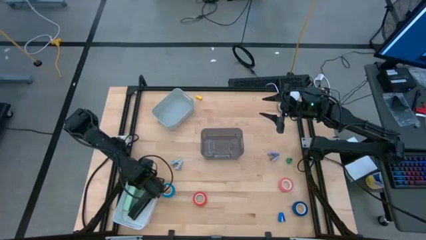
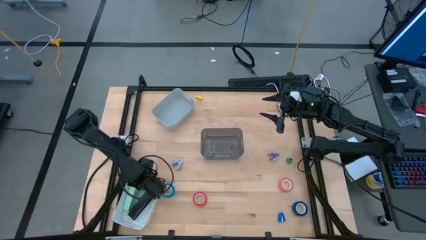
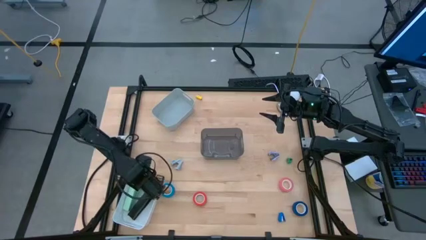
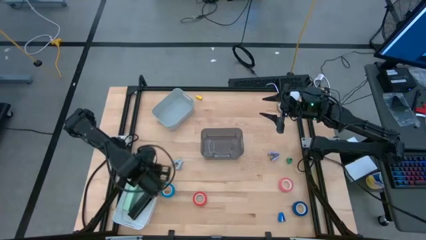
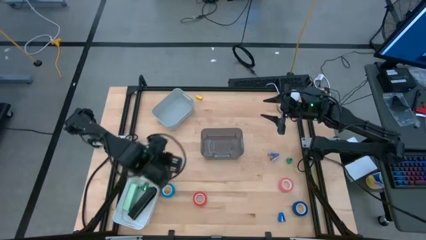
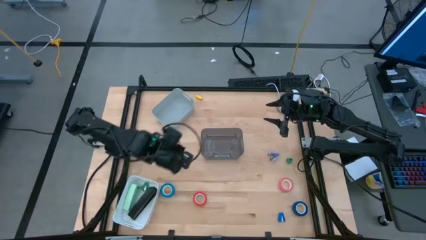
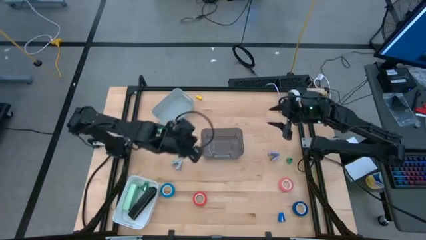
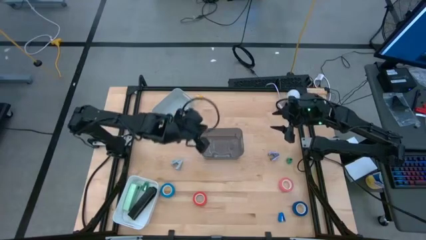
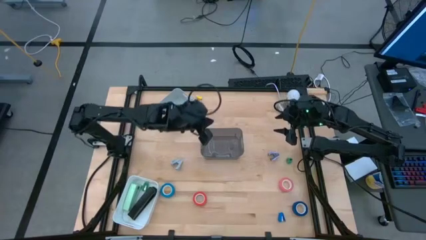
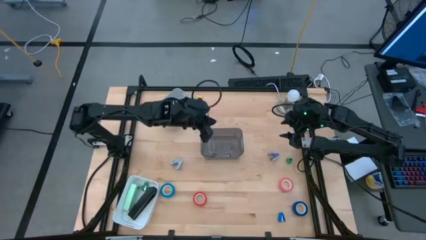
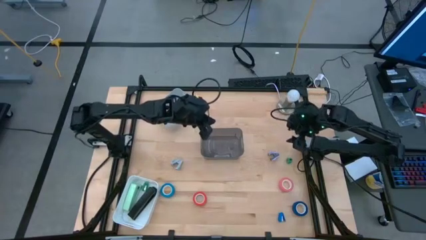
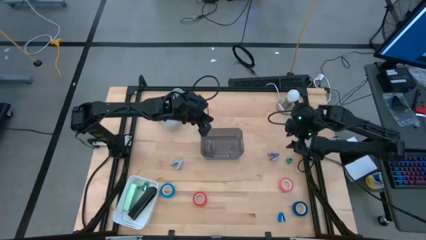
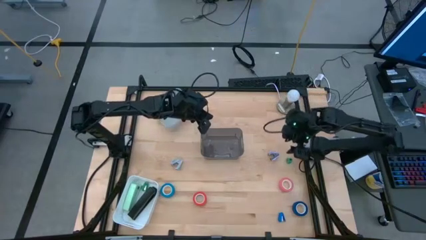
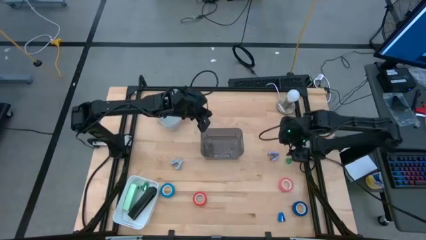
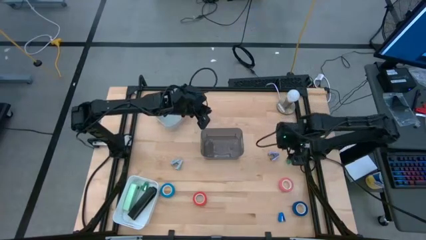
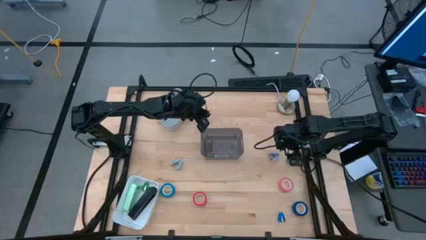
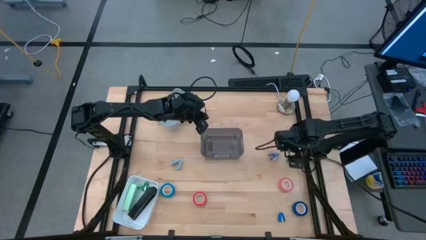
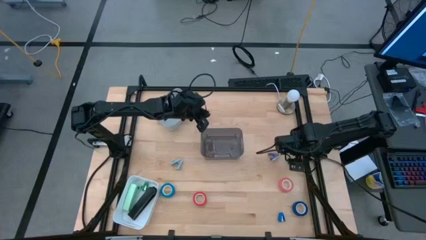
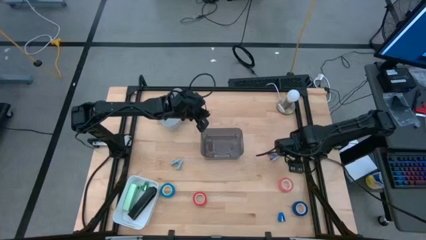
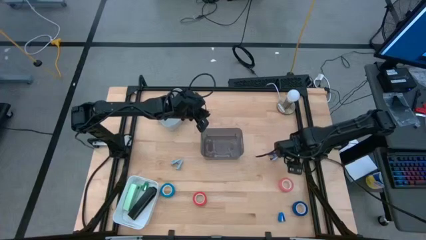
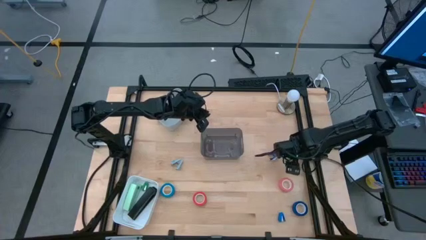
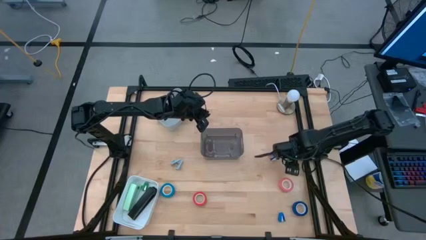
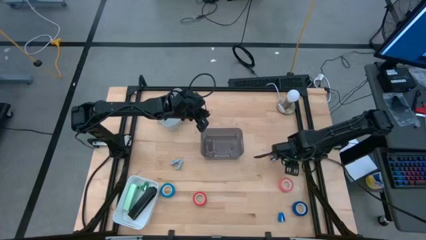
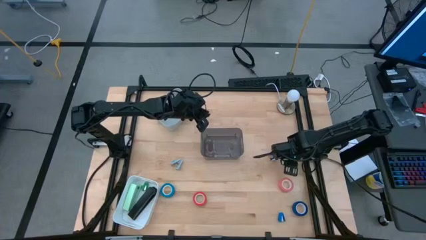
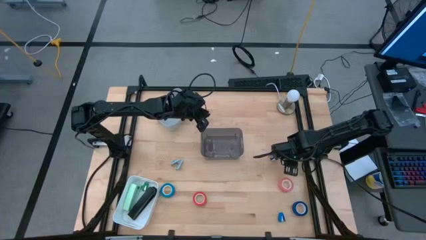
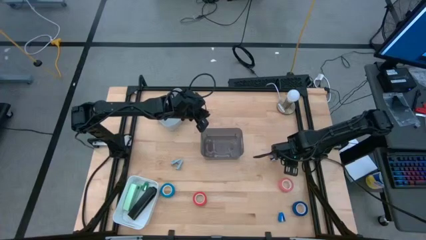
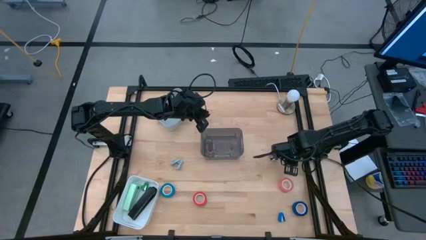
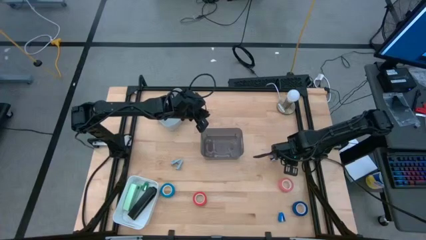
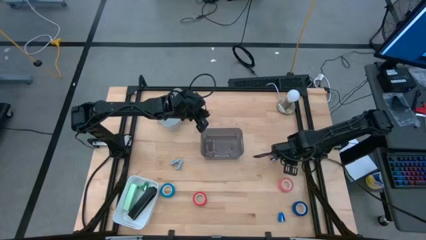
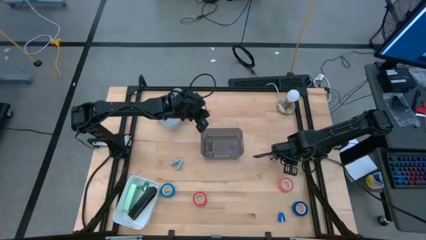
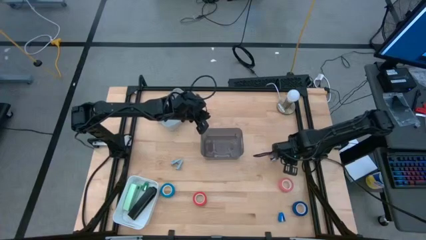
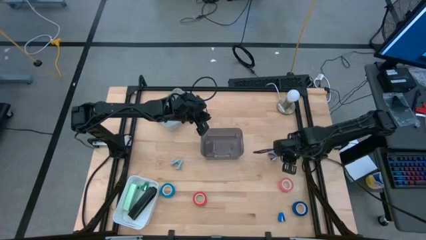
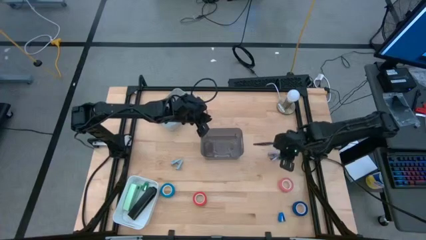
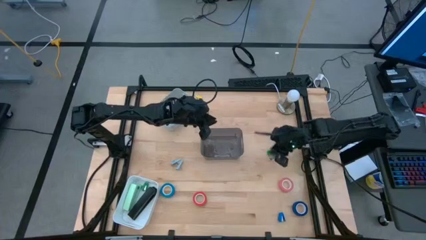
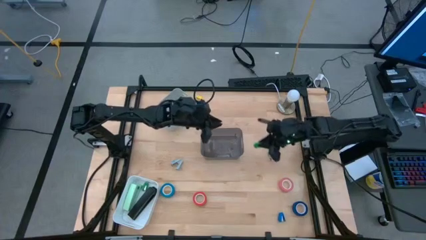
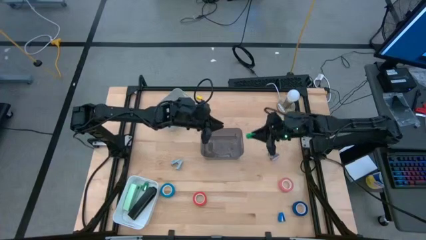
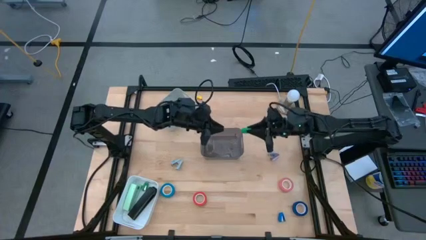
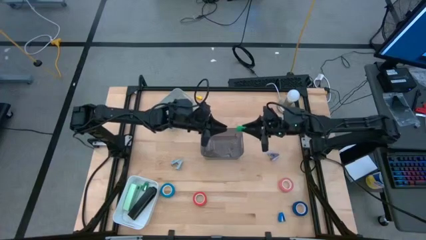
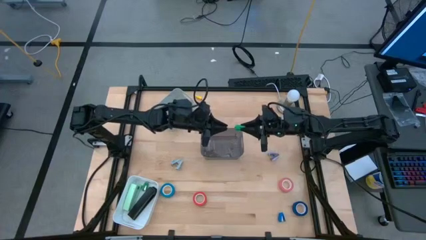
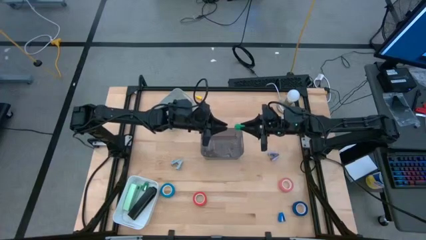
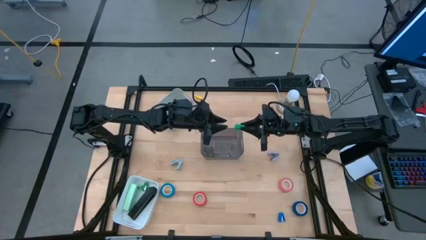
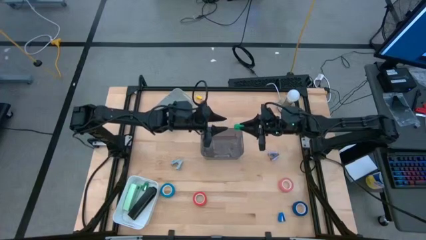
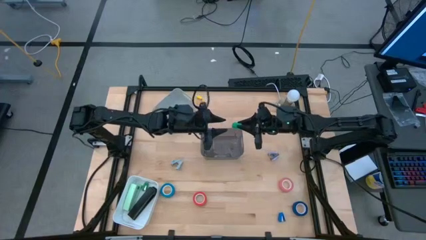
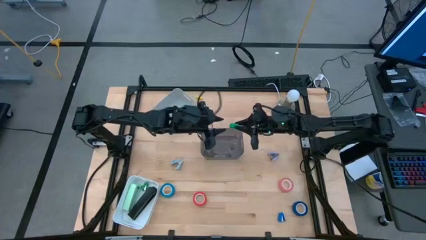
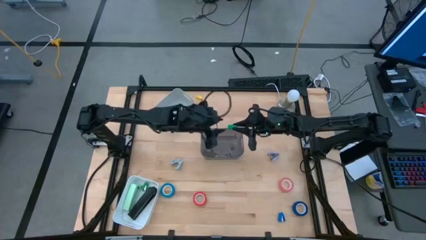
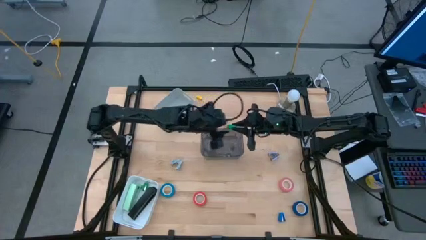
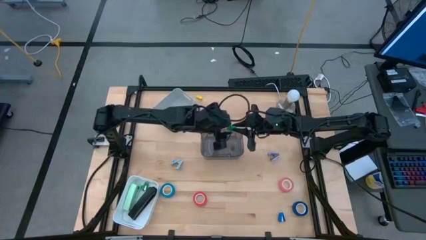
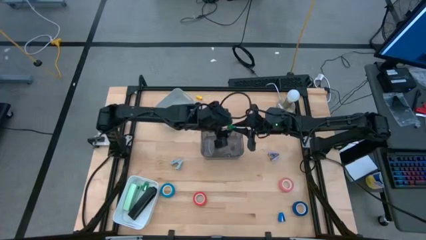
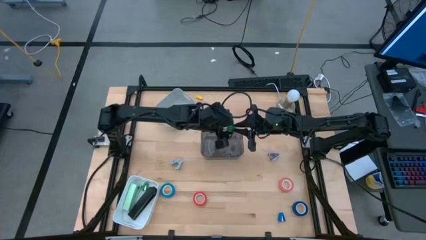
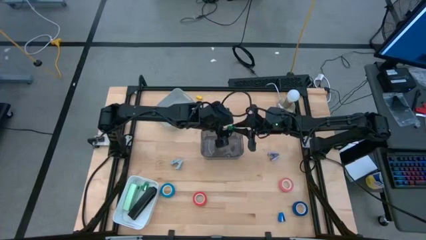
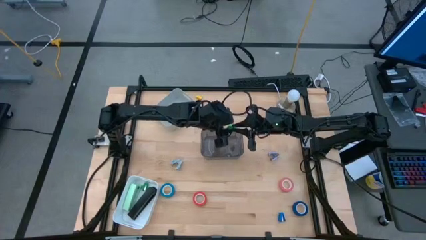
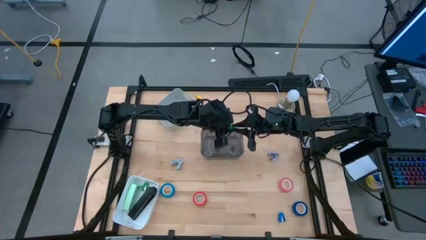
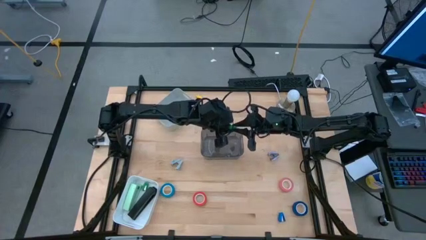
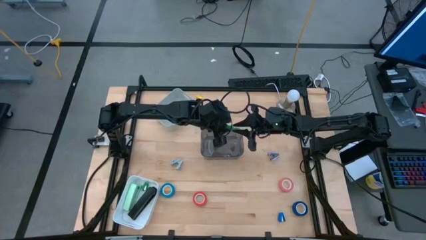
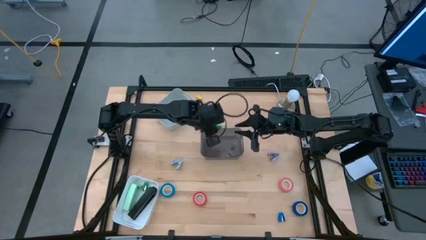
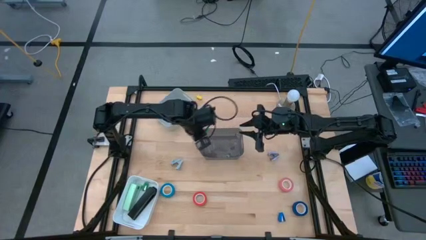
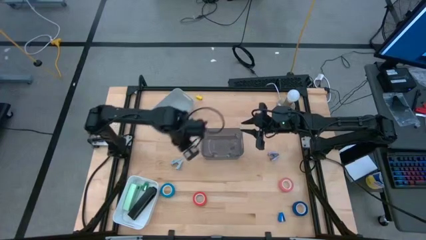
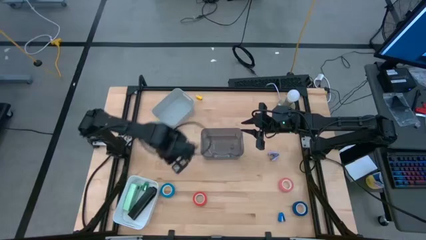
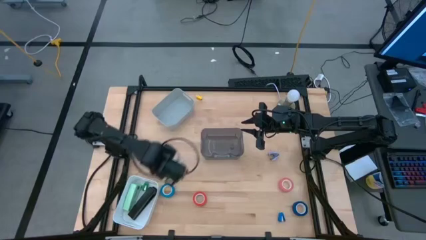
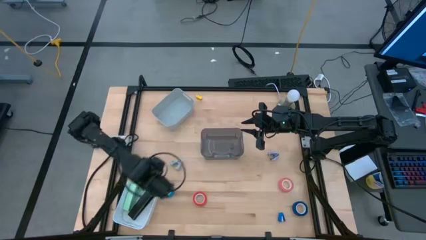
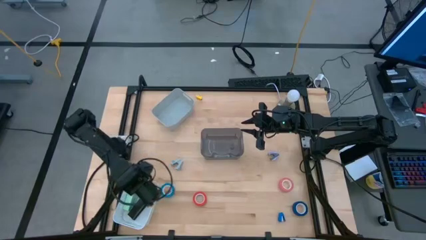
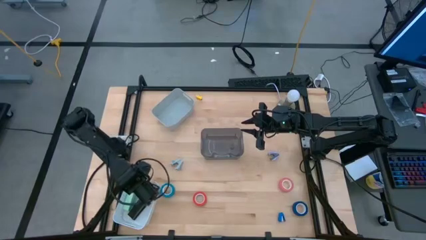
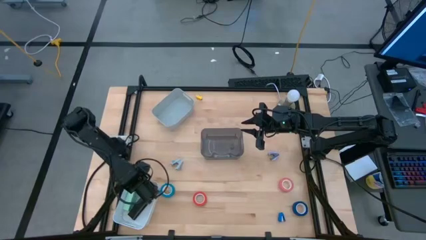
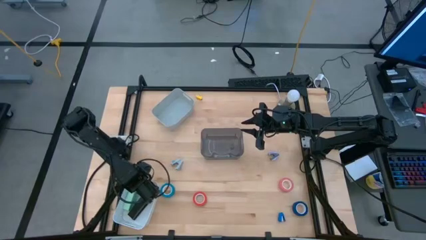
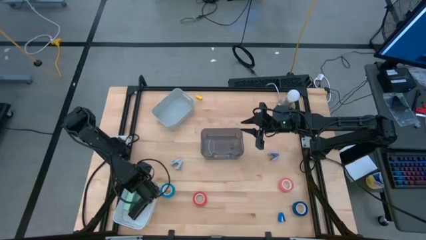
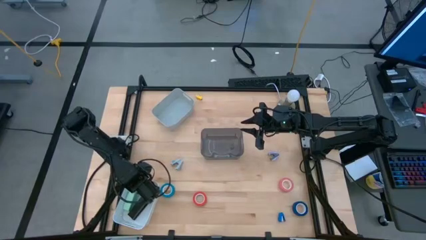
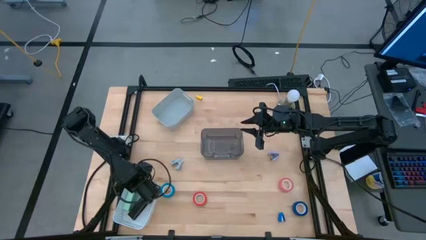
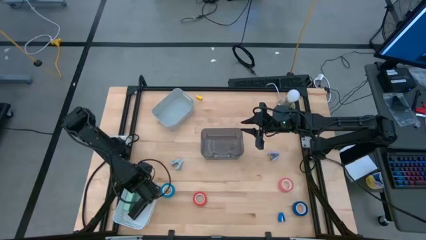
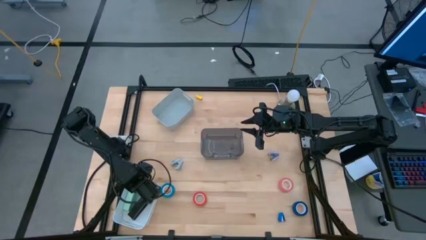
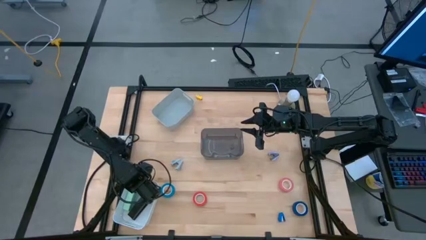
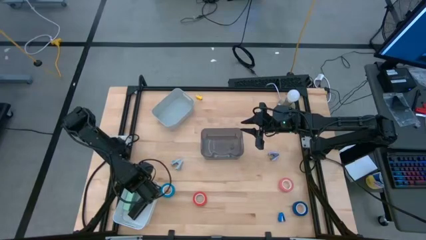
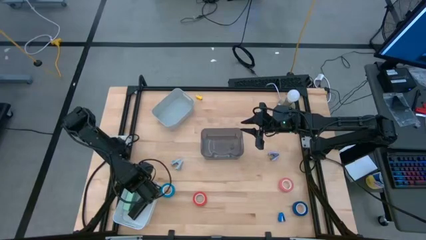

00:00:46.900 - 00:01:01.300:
Task: Pick and place Stapler, Stapler remover, tape
Put the green stapler into the white bin

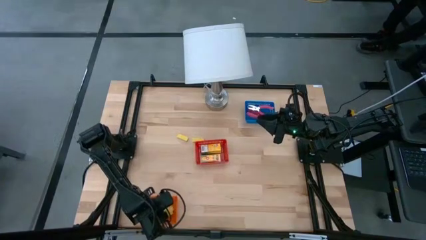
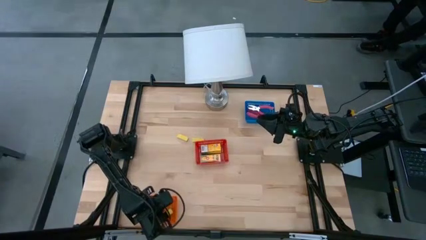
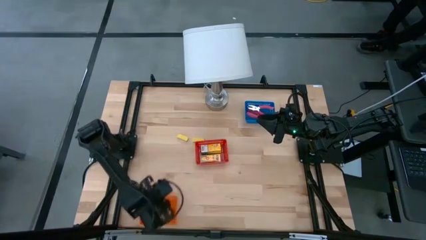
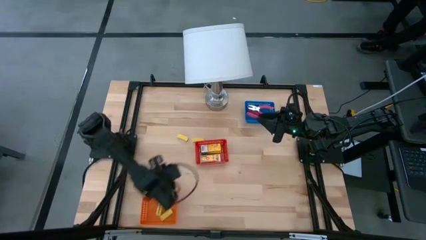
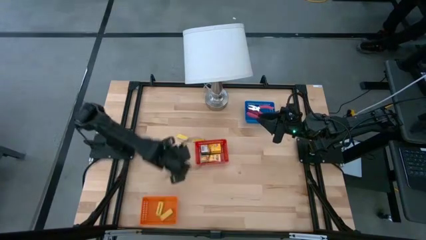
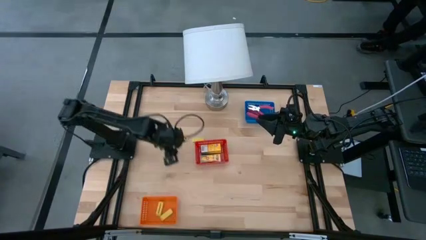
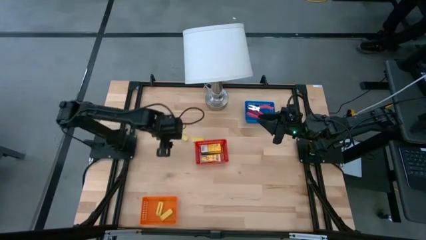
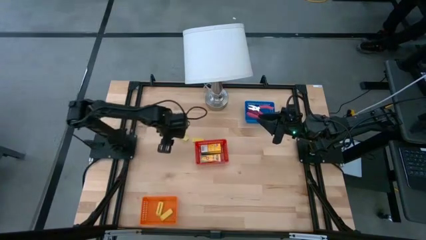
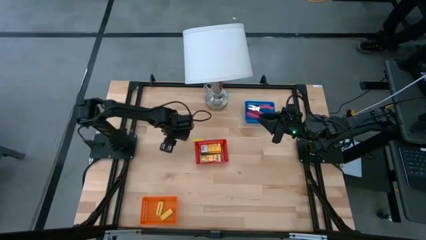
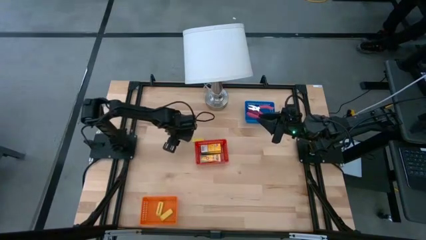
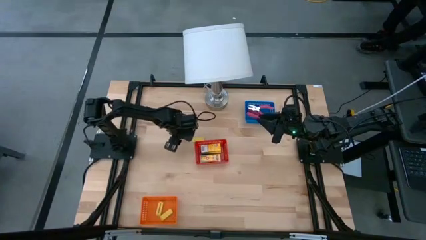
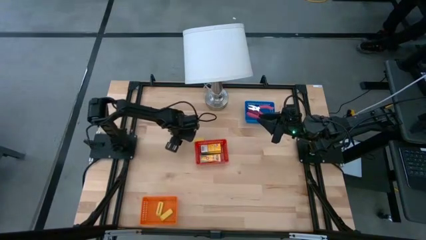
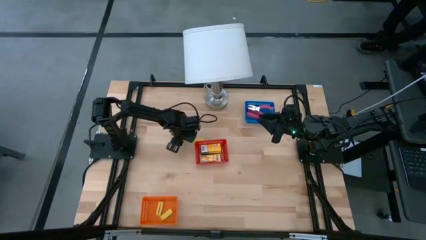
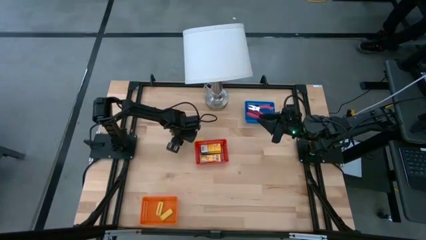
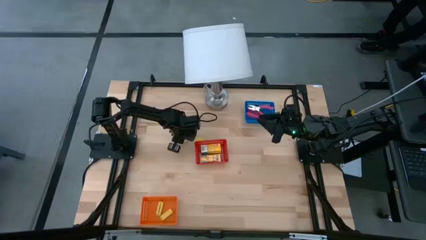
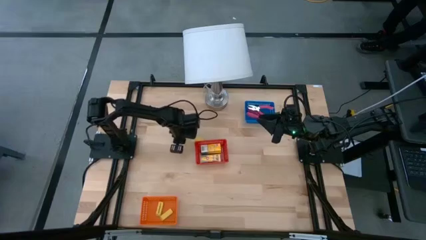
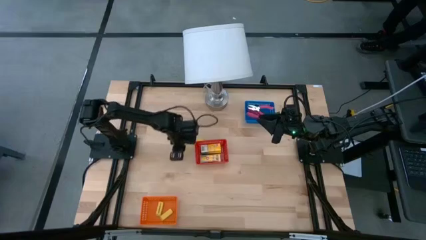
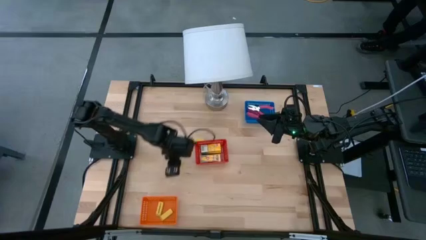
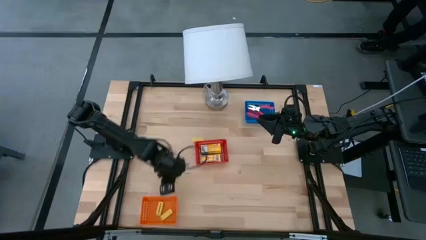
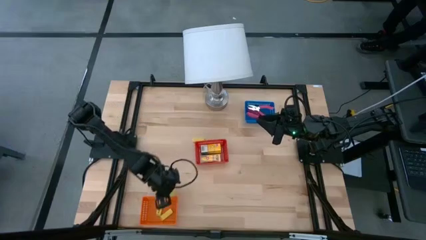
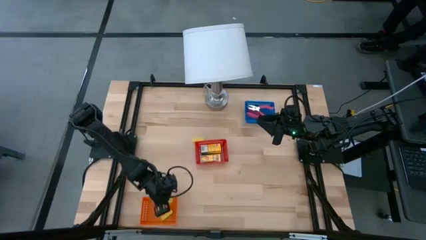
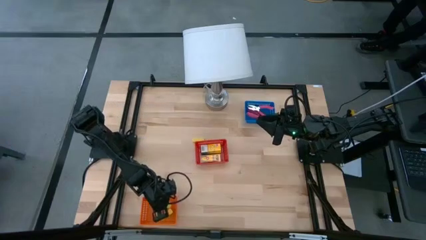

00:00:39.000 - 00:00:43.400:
Task: Pick & Place School Supplies
Put the yellow eraser into the orange bin
